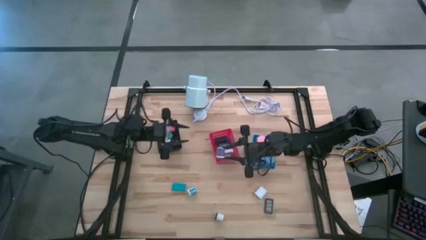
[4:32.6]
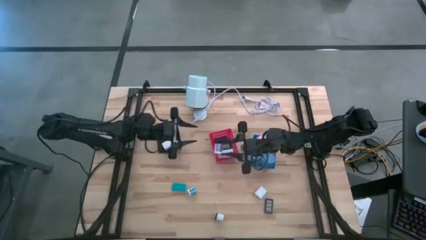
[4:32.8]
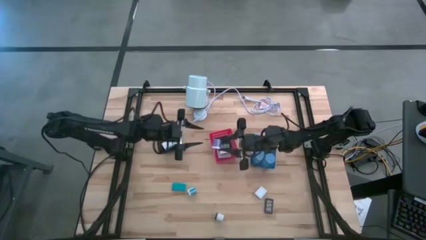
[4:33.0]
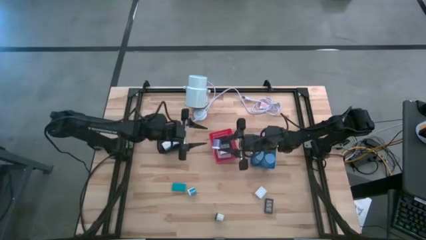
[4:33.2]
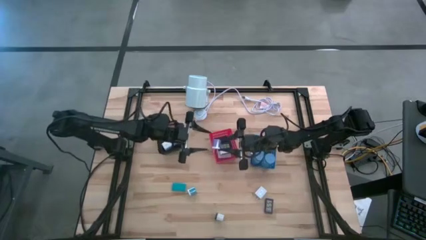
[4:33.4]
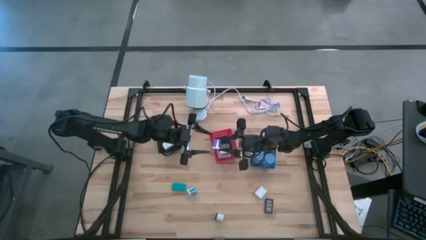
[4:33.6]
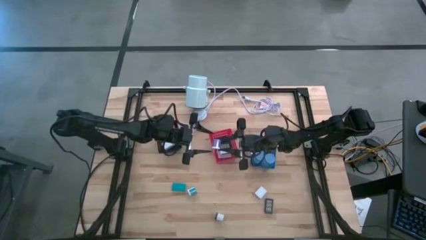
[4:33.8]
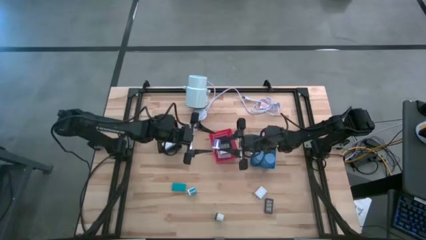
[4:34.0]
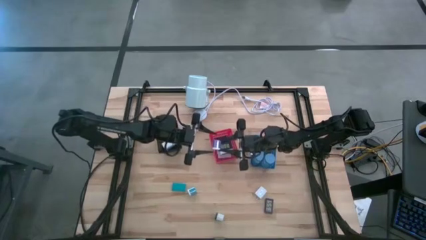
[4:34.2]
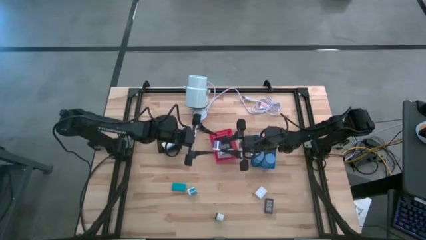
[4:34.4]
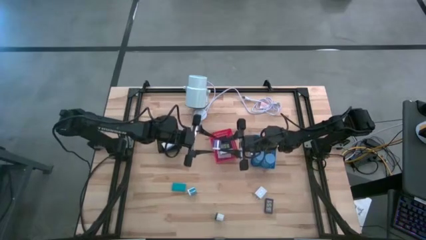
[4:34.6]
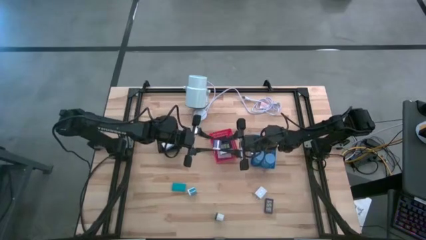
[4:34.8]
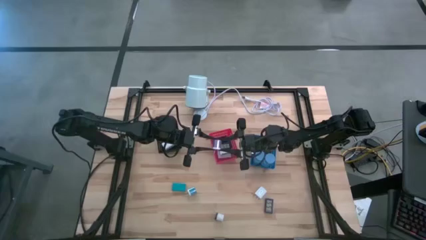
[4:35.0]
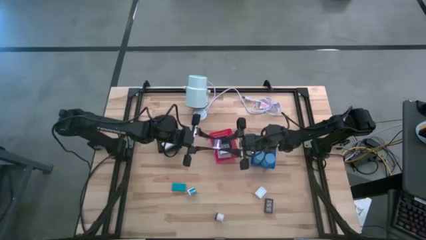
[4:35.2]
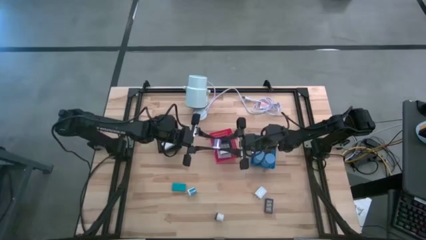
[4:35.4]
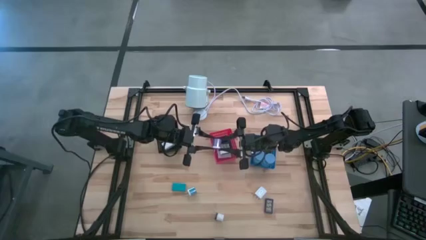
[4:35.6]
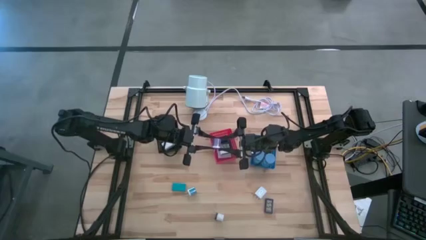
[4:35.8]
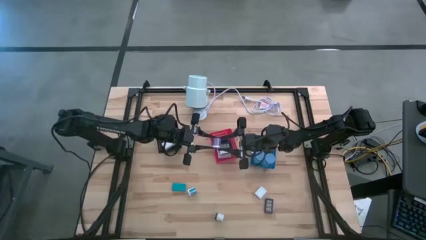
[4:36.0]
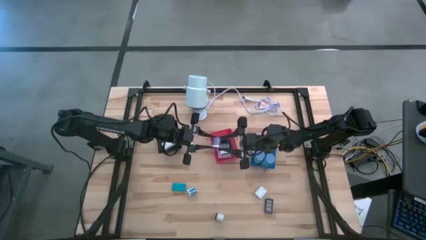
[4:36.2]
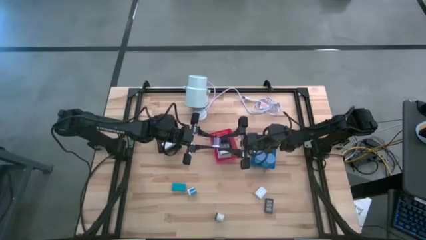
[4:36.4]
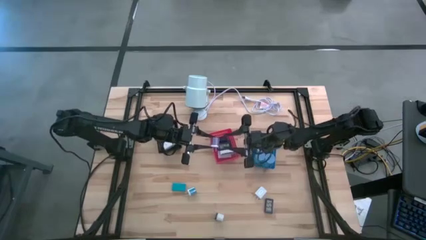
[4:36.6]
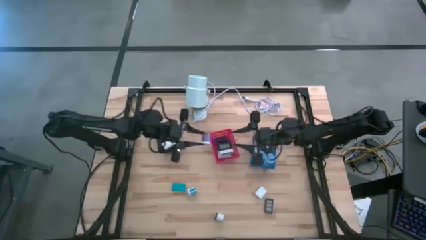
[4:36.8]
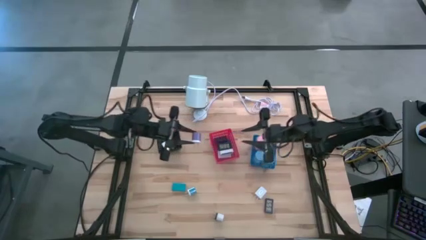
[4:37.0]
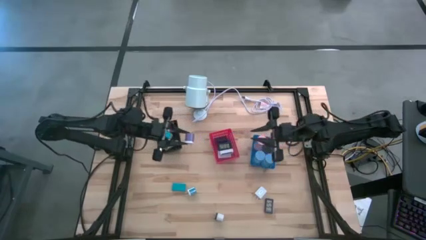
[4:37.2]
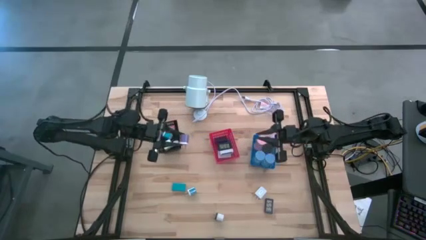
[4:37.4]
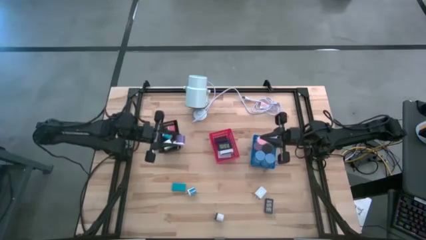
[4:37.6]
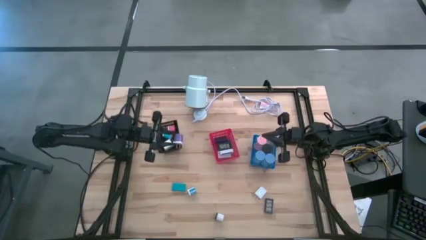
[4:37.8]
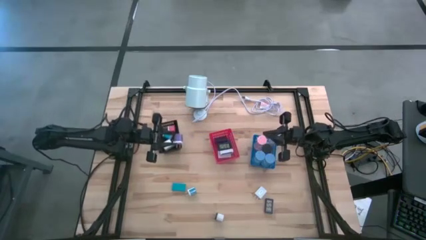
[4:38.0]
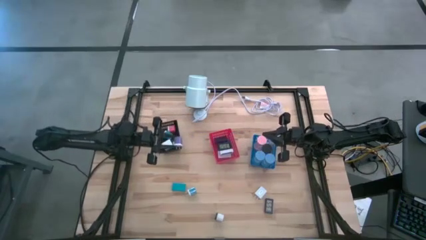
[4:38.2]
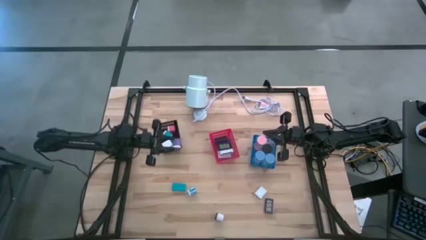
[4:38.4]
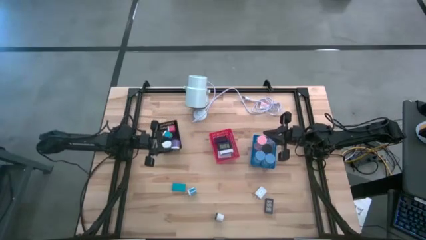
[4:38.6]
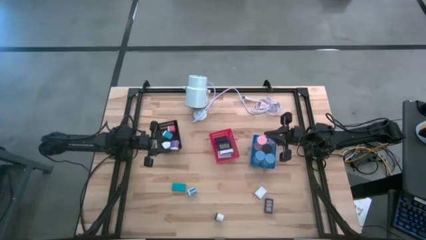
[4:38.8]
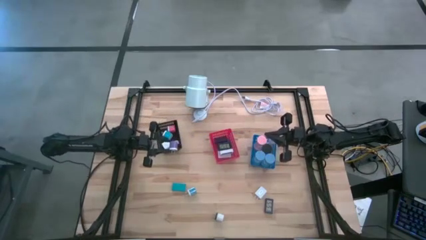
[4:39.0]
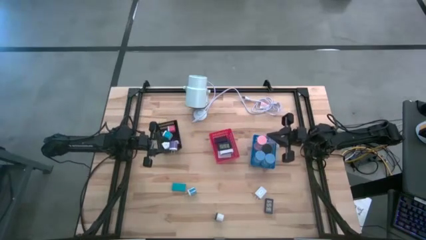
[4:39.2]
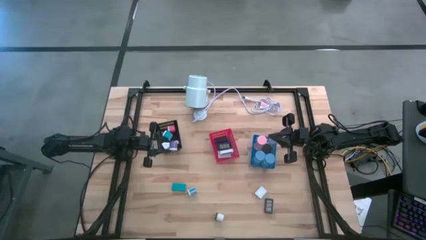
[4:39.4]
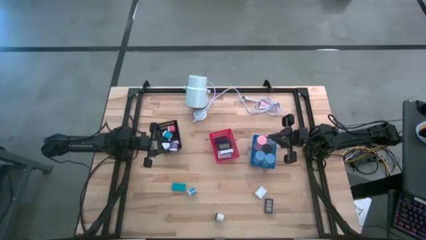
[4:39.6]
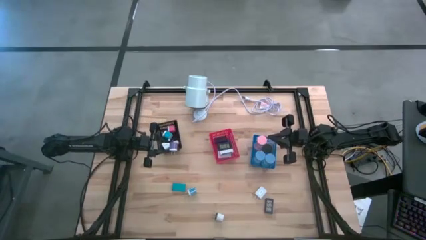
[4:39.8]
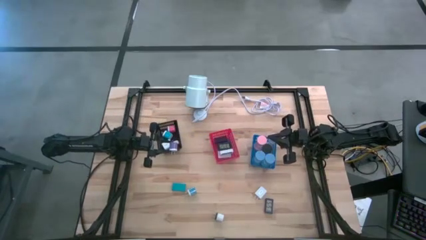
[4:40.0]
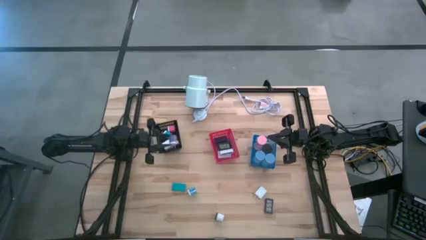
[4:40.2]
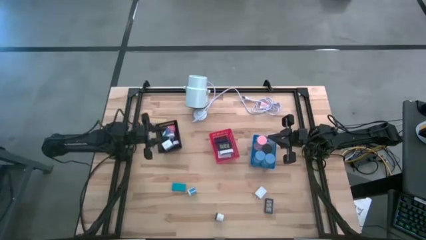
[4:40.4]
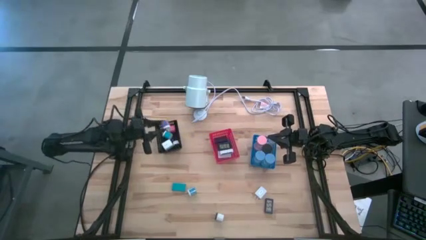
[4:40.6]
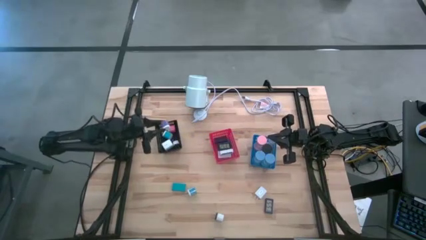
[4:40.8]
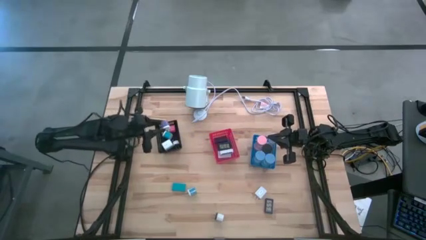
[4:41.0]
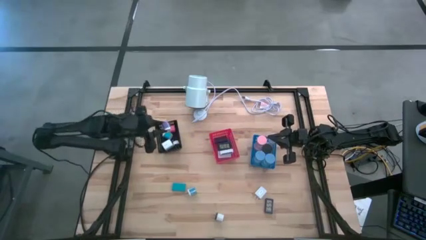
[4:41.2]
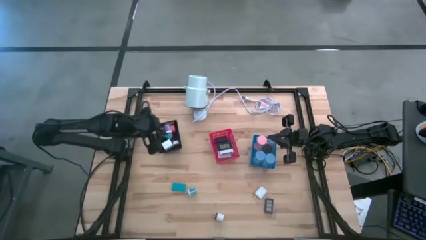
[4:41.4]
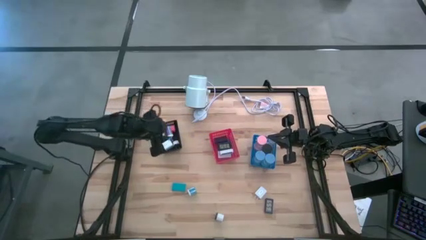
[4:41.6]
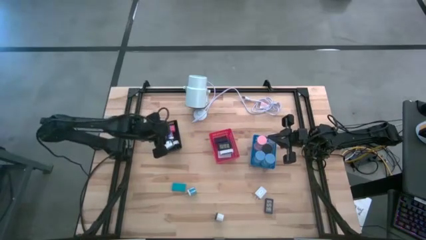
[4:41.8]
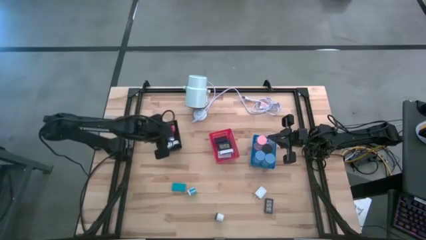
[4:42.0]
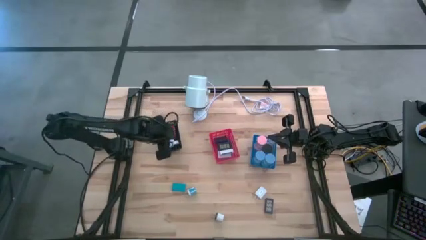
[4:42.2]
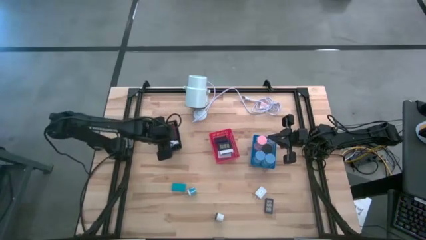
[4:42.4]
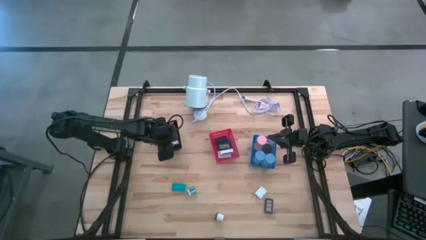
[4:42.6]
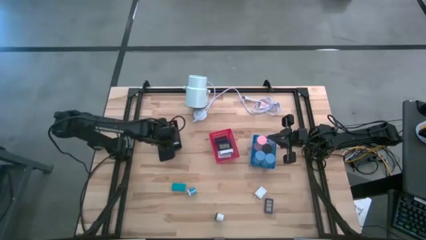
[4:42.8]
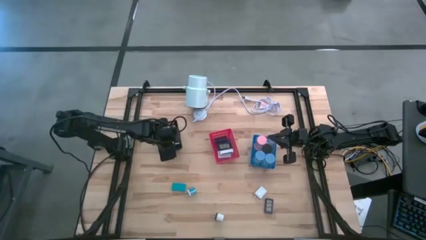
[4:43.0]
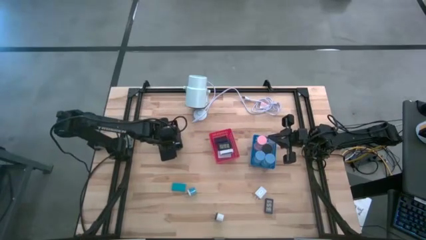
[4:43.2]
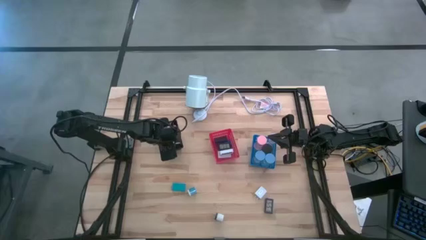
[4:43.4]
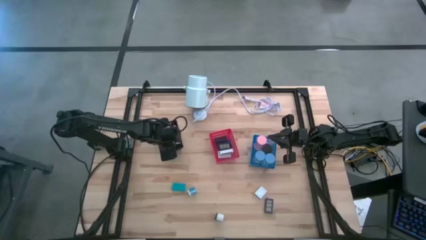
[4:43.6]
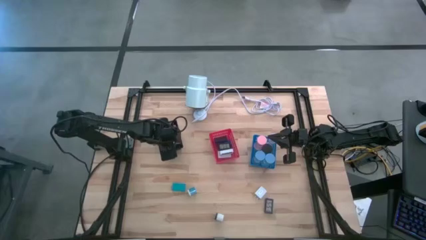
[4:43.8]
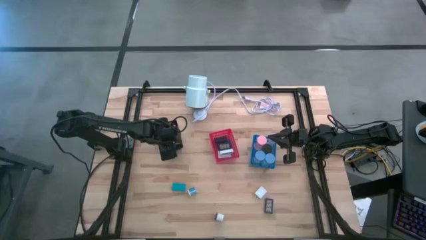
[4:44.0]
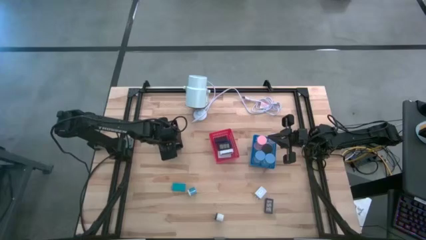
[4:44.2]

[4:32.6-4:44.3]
Task: Pick & Place Office items
Put the purple charger adapter into the black bin

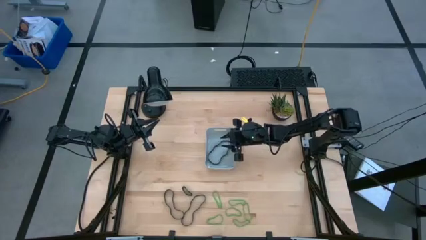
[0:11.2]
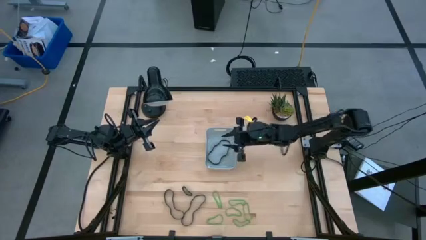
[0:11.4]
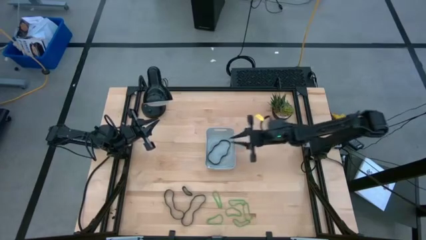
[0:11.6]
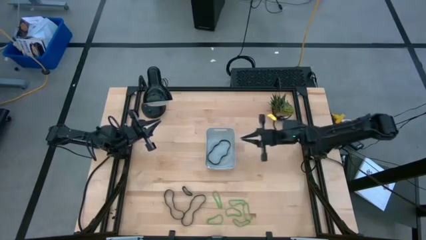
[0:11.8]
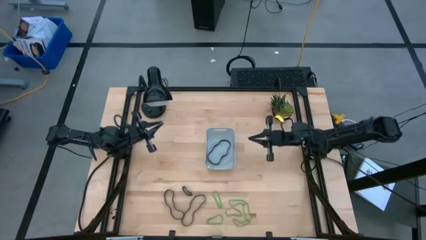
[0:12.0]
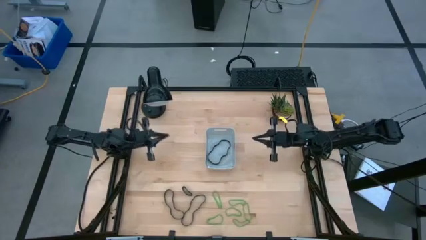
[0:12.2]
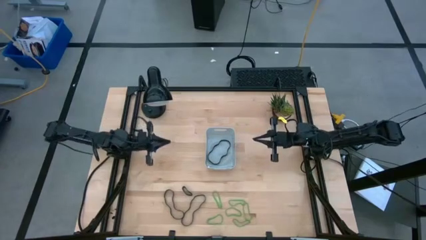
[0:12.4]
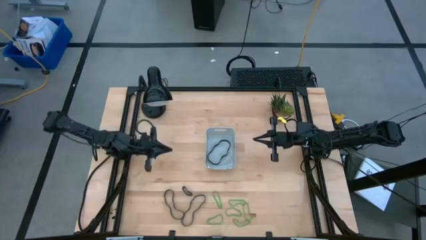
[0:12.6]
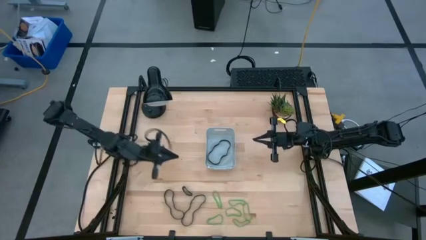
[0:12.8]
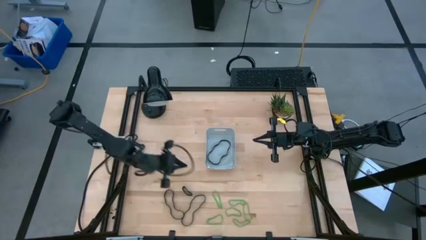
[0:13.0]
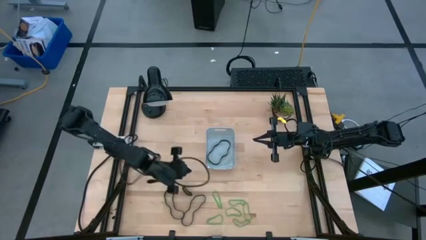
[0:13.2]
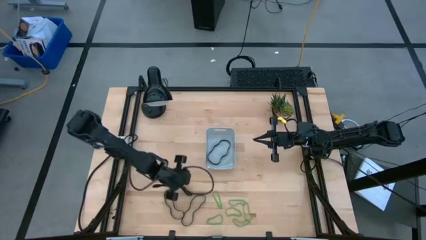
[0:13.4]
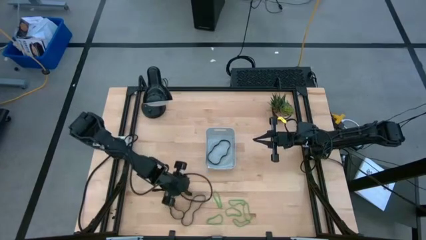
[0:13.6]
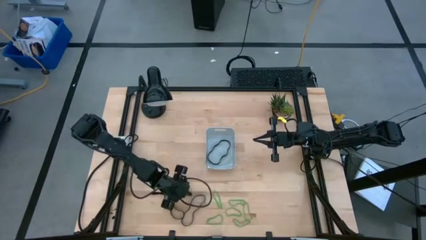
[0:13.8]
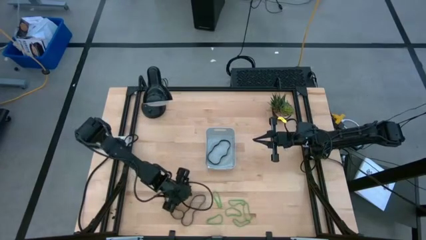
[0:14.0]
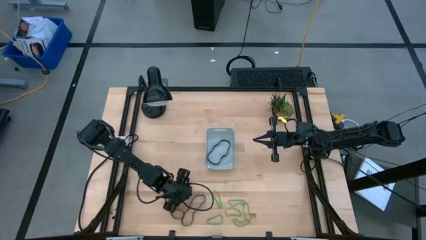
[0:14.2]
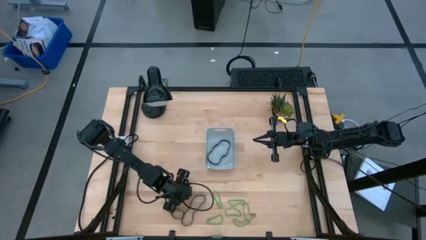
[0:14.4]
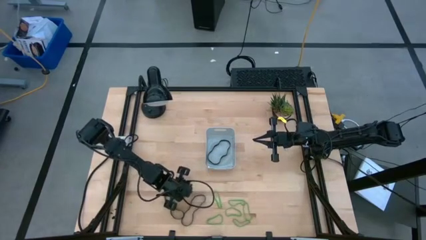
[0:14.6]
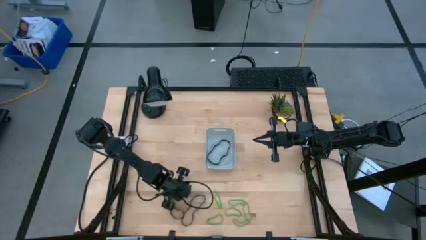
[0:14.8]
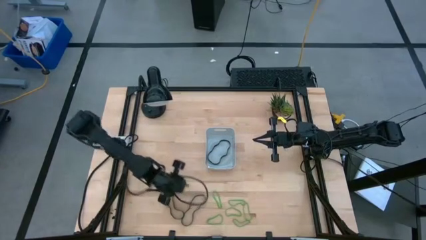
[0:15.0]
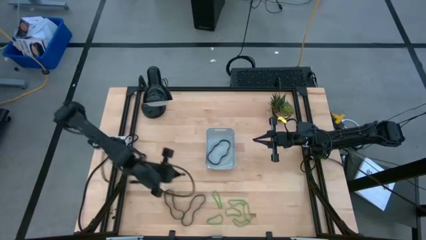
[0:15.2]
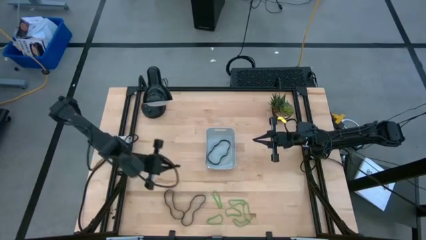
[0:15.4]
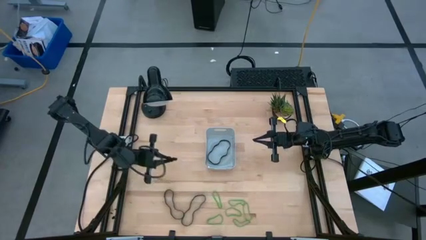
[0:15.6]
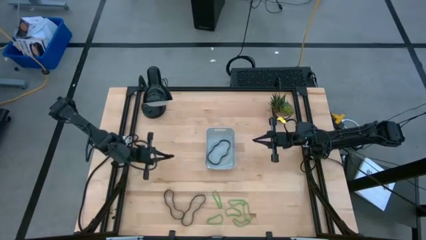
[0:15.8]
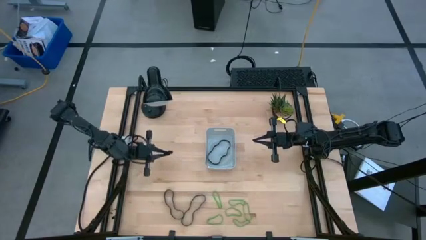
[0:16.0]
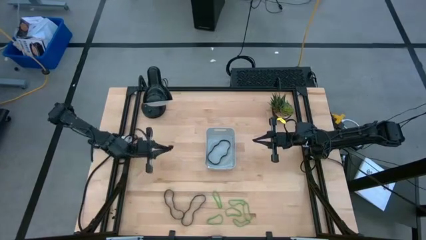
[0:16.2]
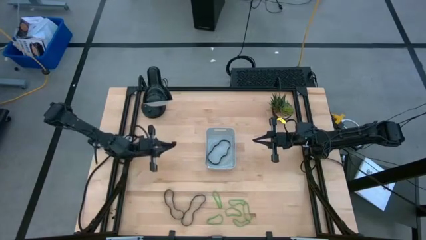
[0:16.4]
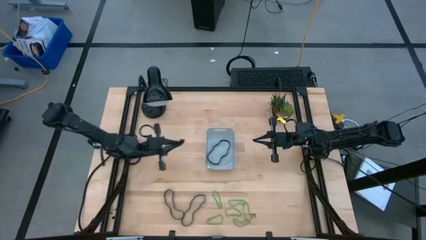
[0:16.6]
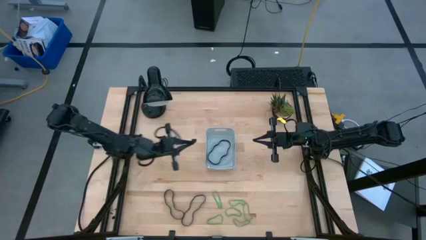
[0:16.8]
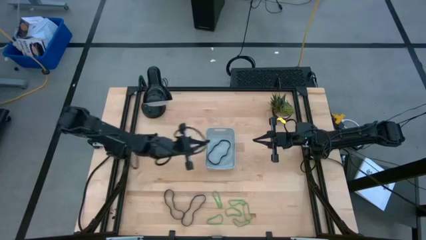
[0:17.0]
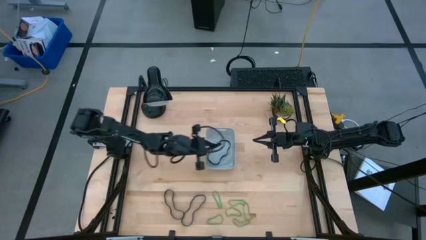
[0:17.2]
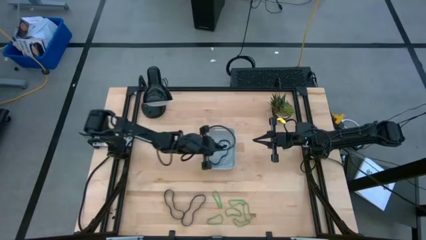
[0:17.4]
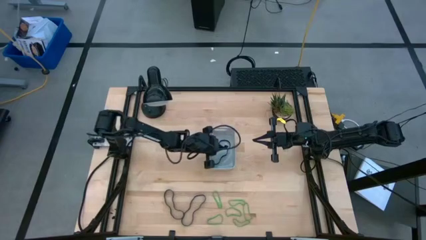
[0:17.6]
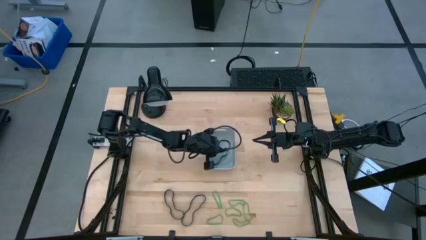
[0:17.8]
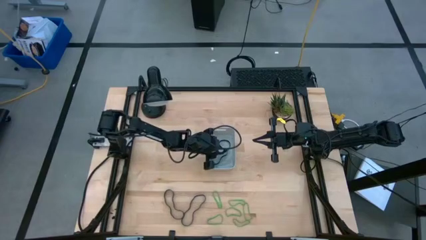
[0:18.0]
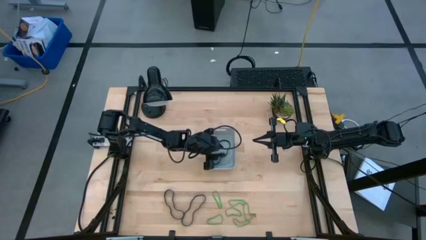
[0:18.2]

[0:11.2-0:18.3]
Task: Pick and place rubber bands into bin
Put the black rubber band into the gray bin
